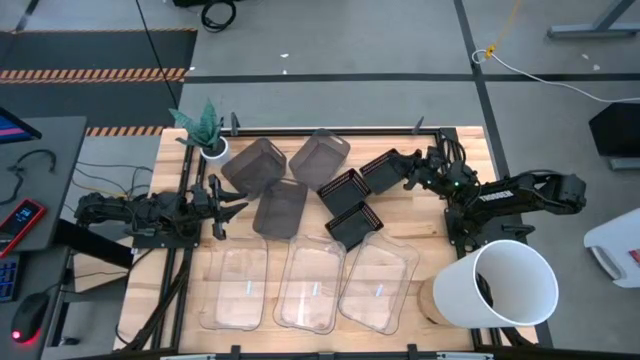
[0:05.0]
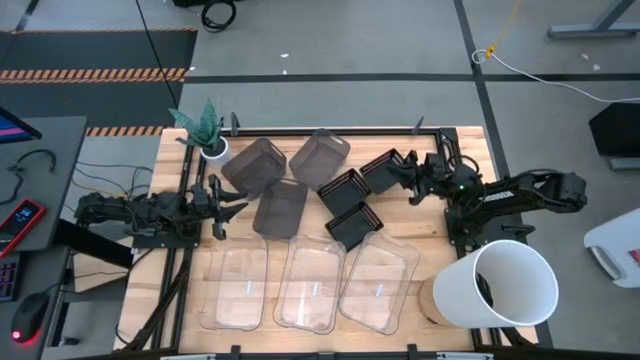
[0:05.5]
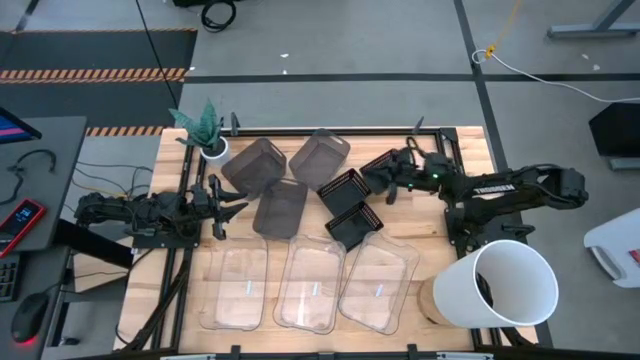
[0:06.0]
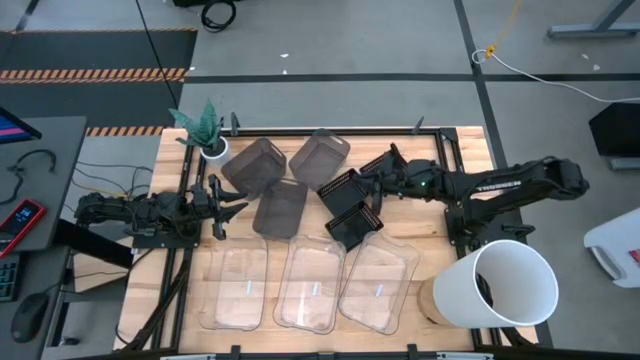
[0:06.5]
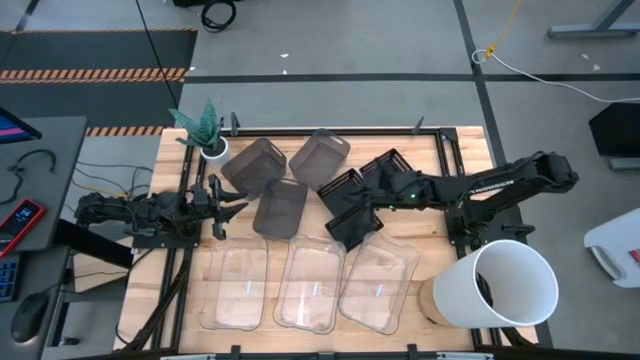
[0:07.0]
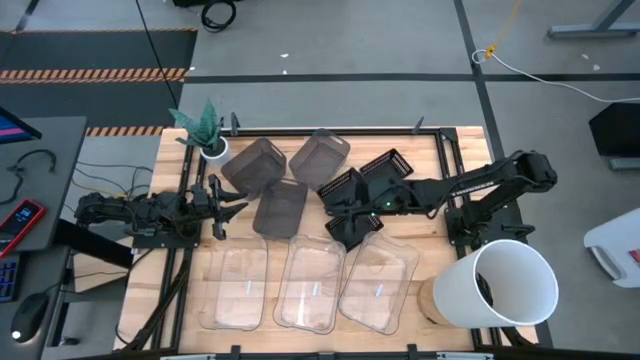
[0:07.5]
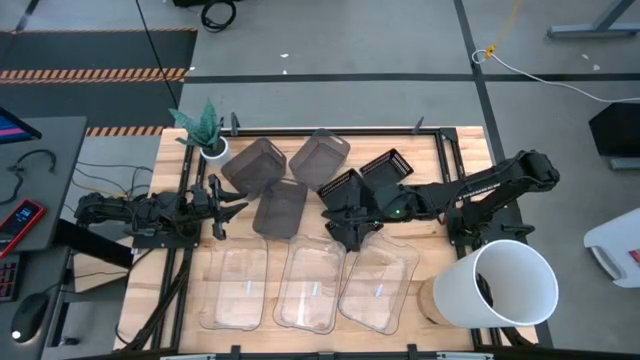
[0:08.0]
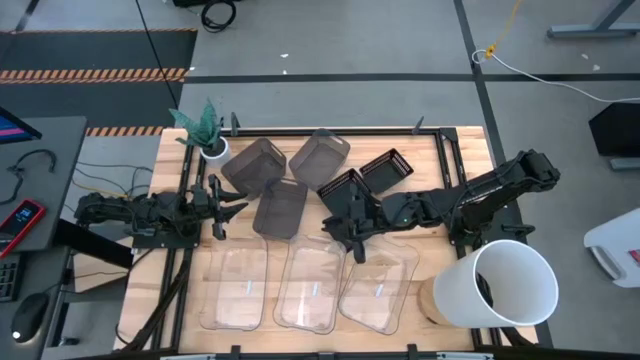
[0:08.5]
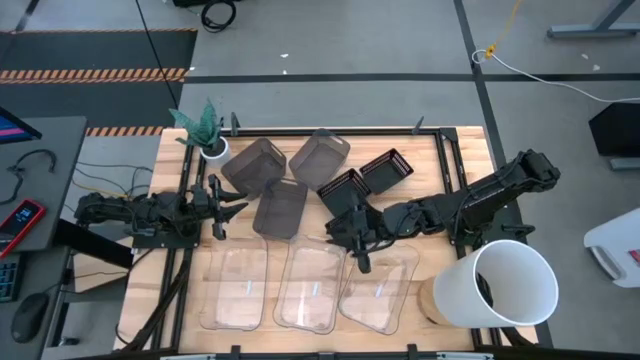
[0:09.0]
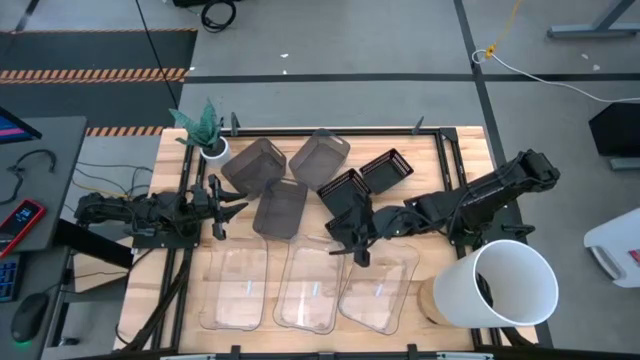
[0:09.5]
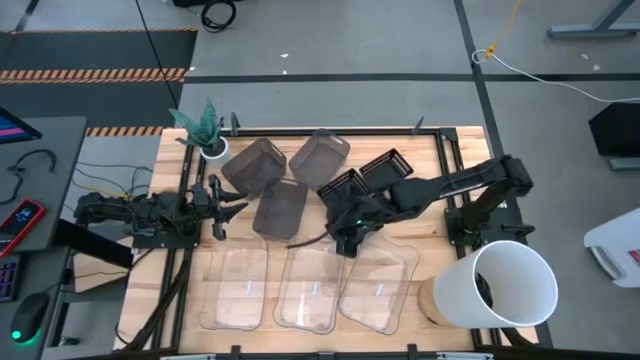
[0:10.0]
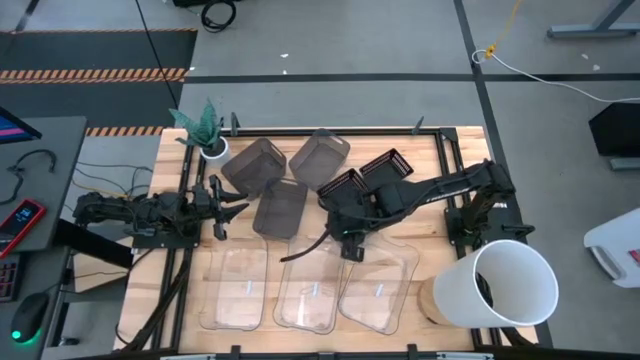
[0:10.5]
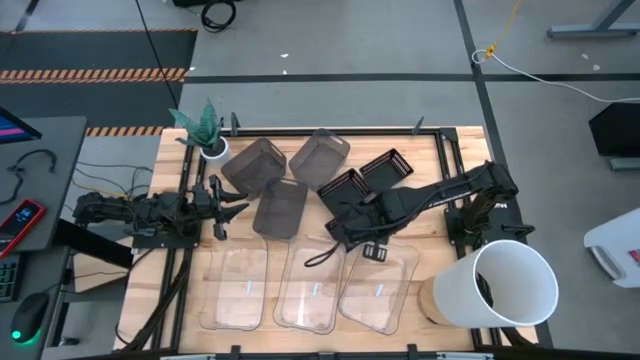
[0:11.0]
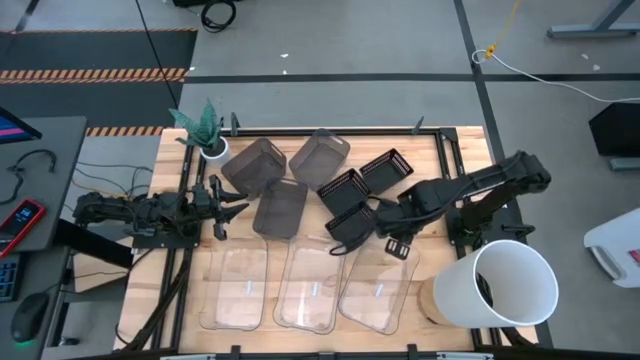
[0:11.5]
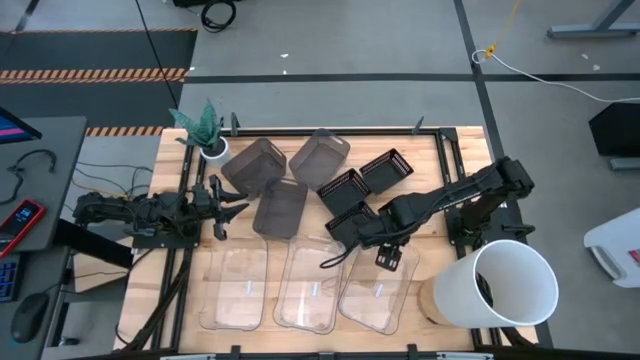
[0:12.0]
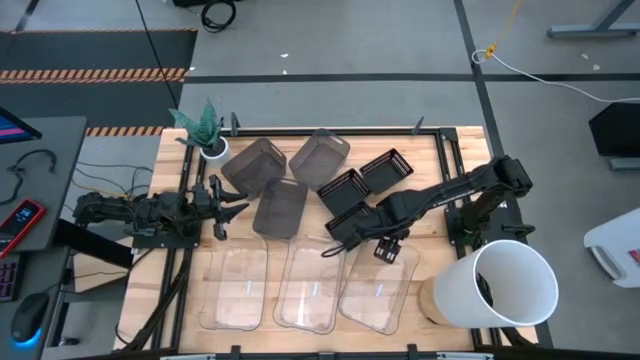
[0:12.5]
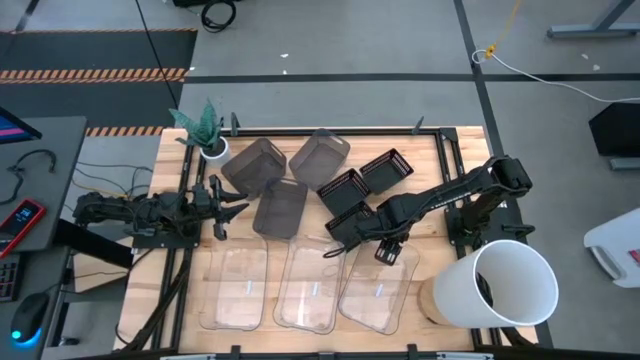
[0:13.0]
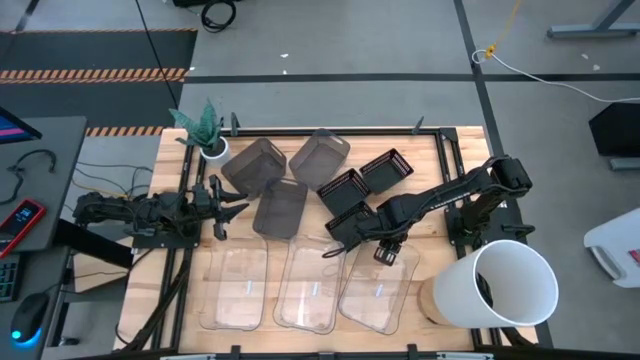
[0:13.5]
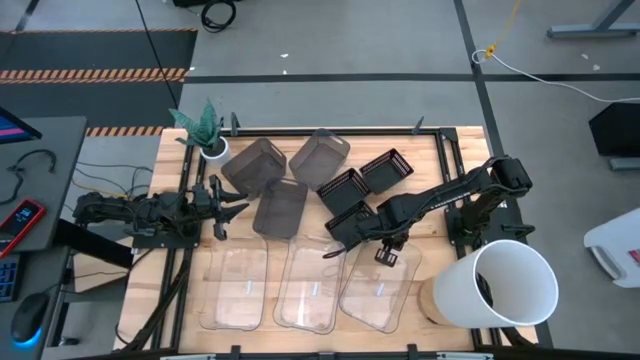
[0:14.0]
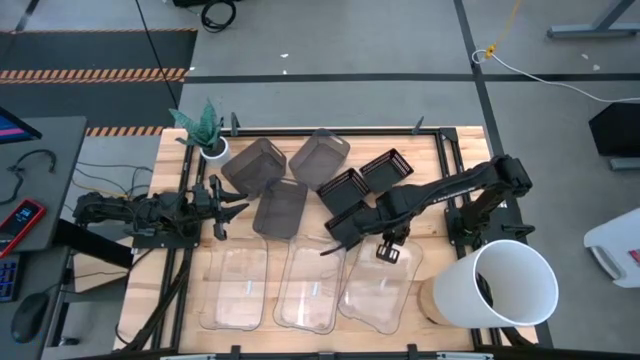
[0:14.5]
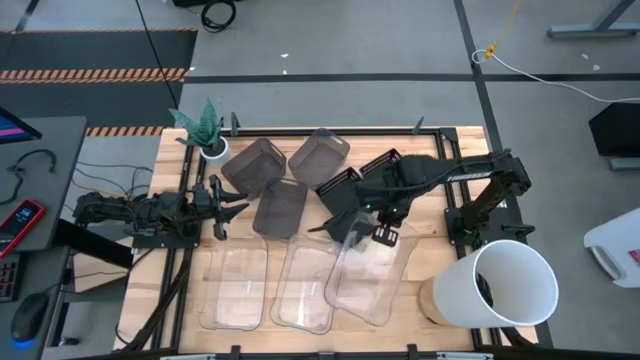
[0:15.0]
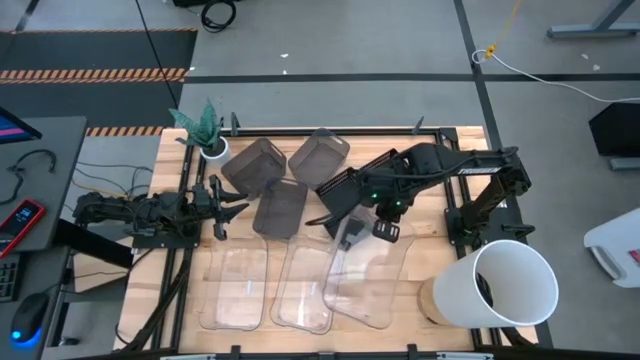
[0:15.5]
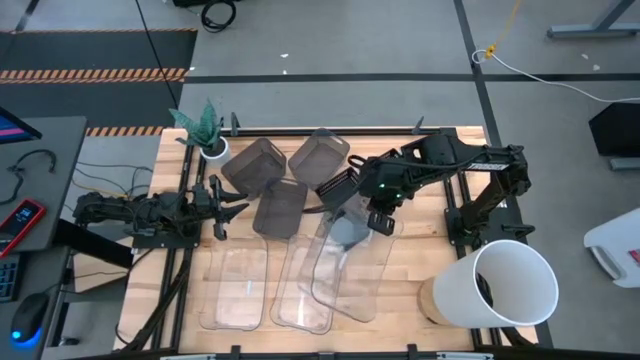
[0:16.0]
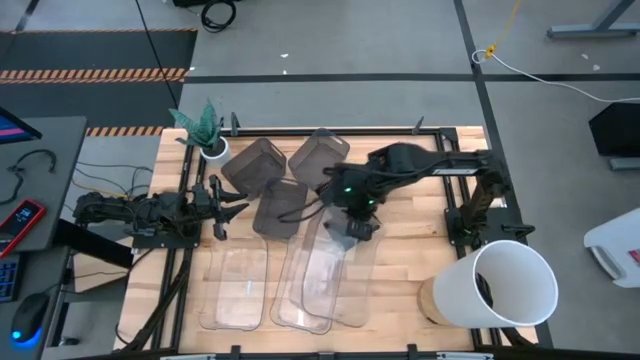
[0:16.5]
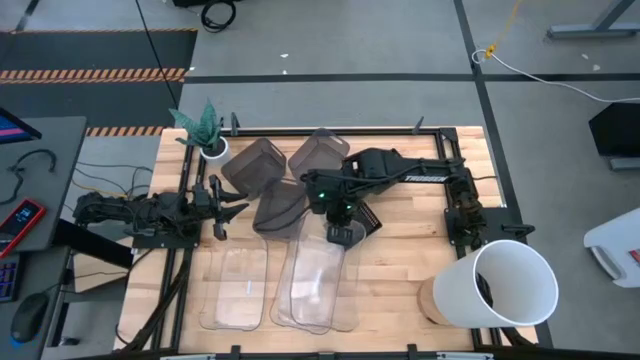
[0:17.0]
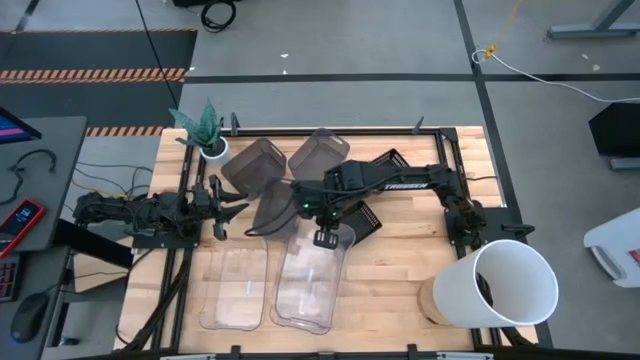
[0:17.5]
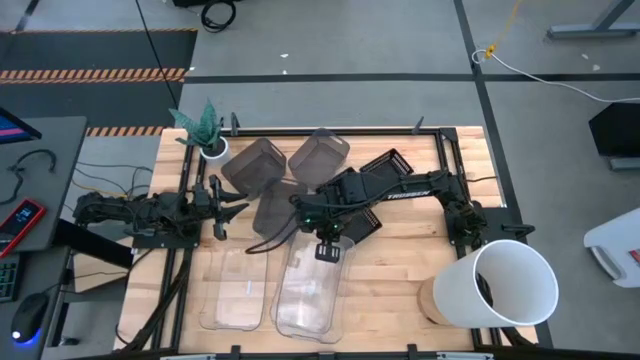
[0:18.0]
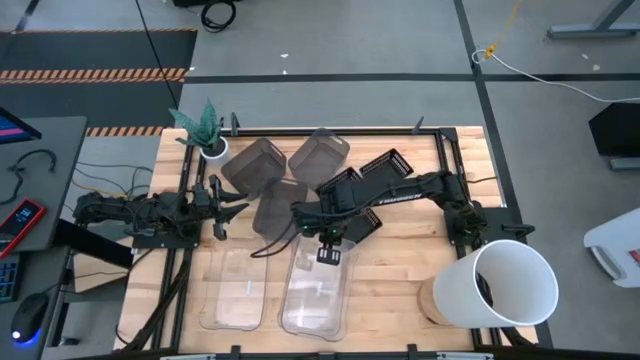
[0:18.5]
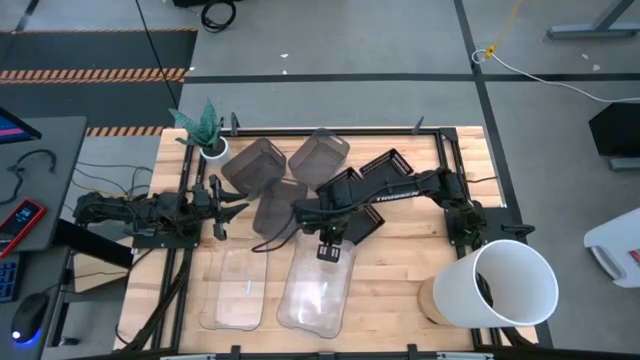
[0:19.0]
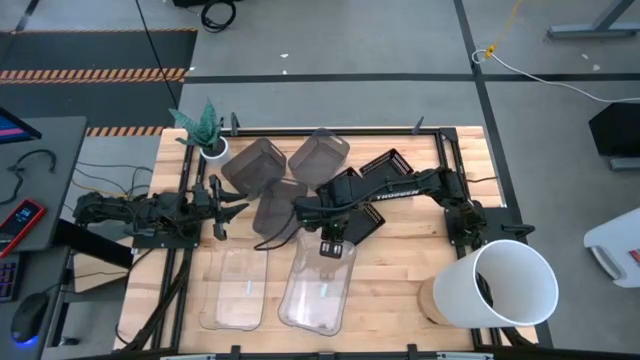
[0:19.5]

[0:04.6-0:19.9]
Stack the right transparent bin on top of the middle transparent bin

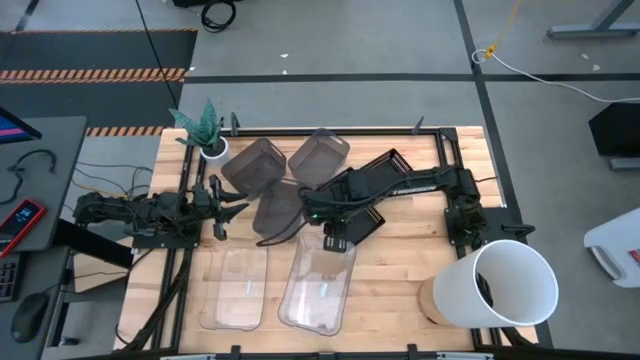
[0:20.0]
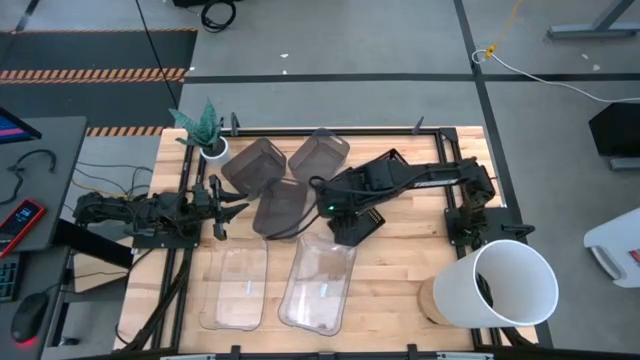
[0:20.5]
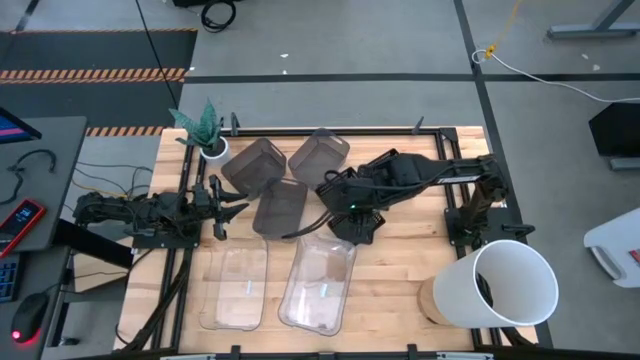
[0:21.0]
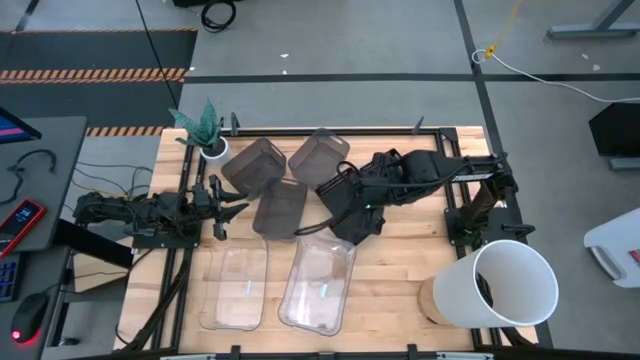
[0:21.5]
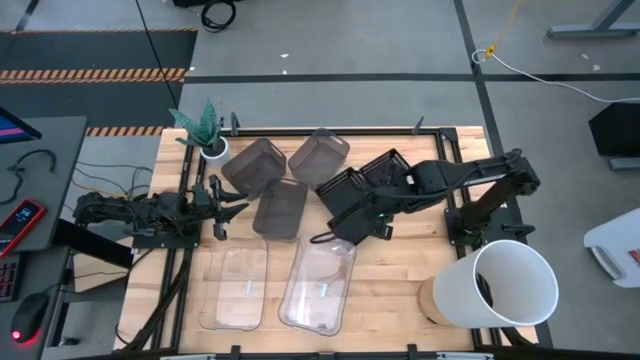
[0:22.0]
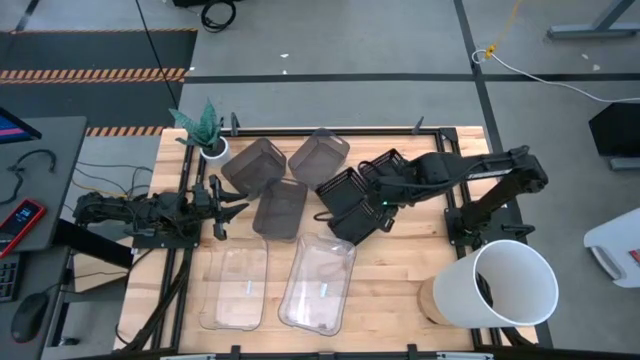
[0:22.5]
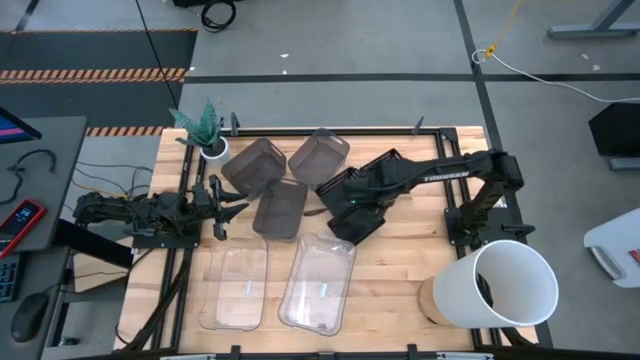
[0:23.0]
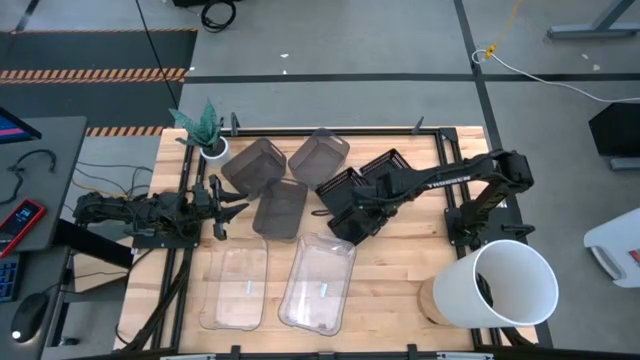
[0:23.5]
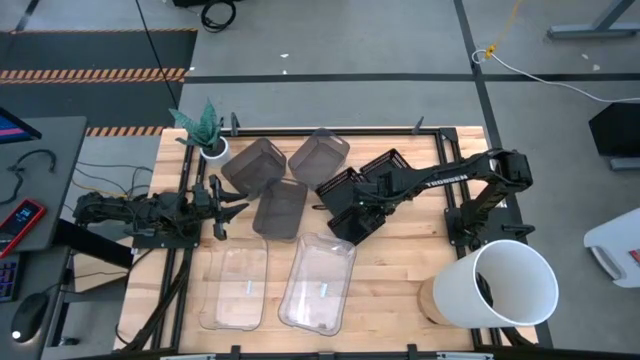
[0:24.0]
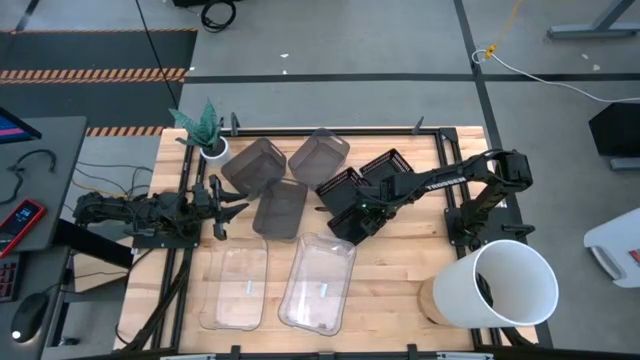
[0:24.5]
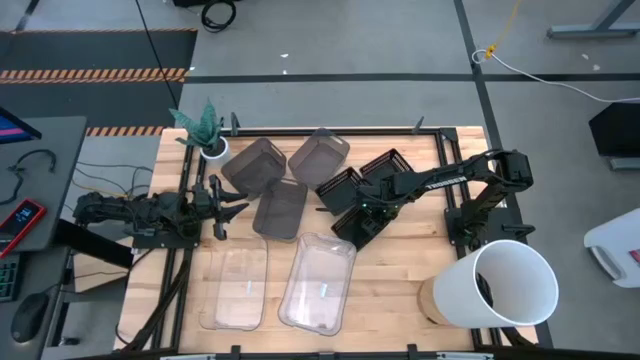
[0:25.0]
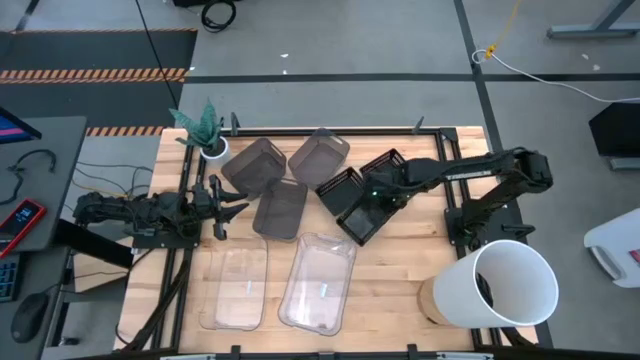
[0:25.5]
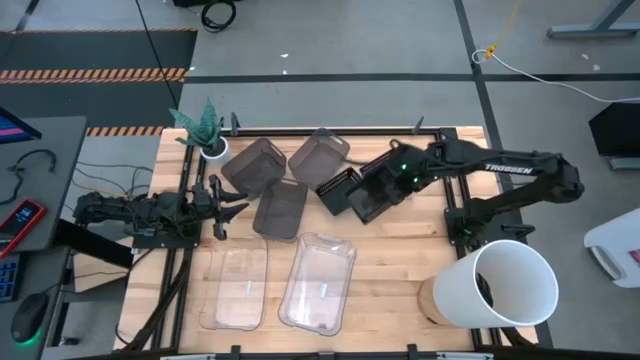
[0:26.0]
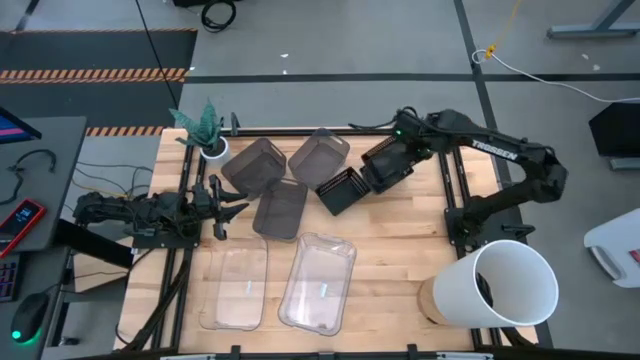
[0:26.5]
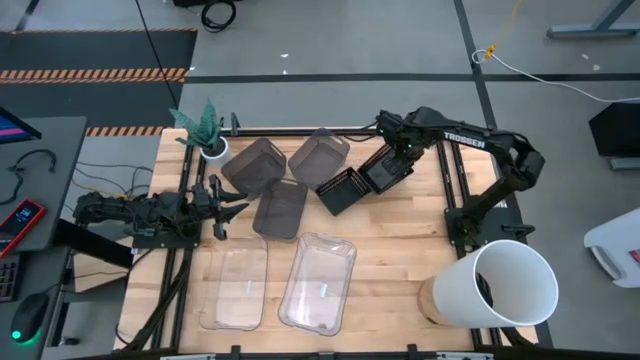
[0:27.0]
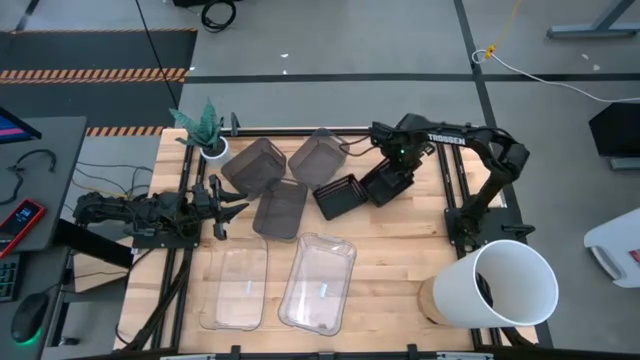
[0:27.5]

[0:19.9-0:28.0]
Stack the bottom black bin on top of the top right black bin
